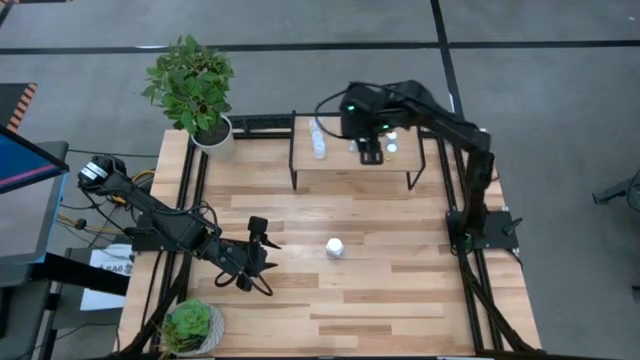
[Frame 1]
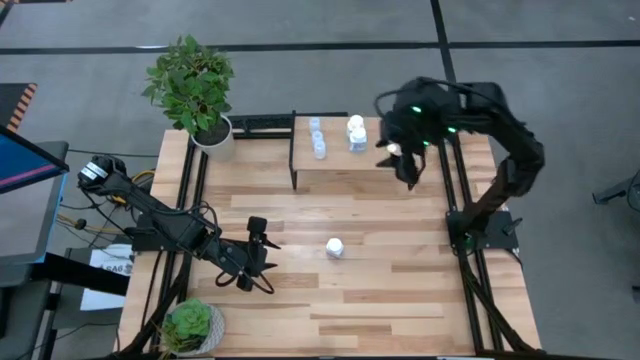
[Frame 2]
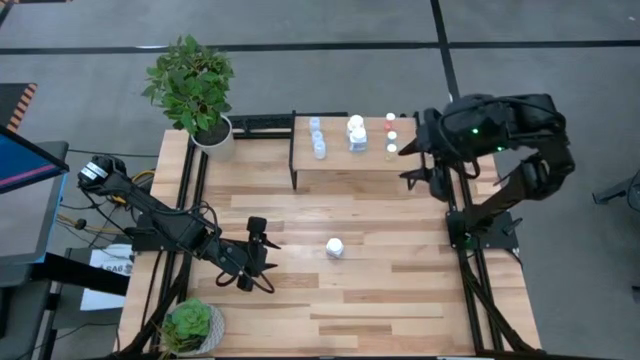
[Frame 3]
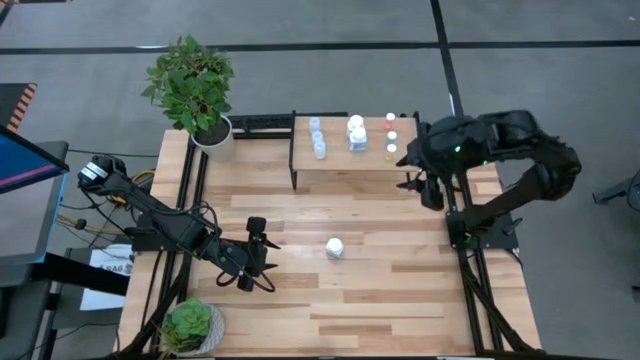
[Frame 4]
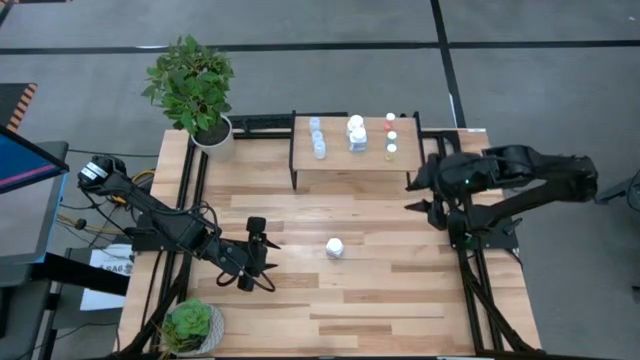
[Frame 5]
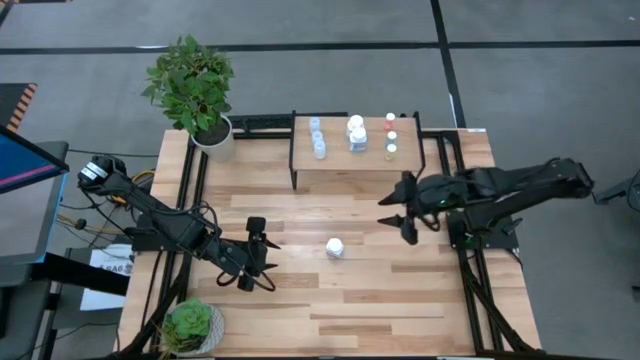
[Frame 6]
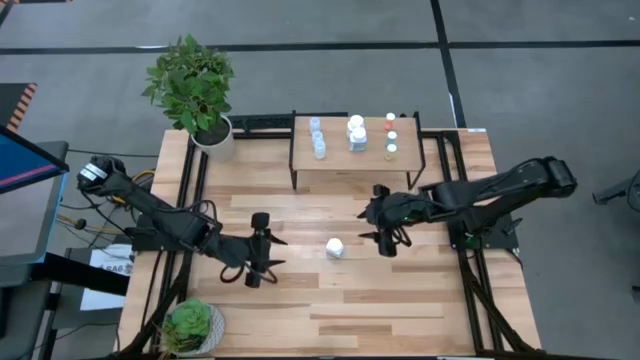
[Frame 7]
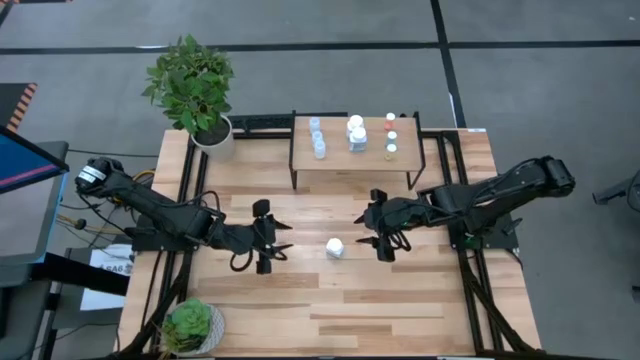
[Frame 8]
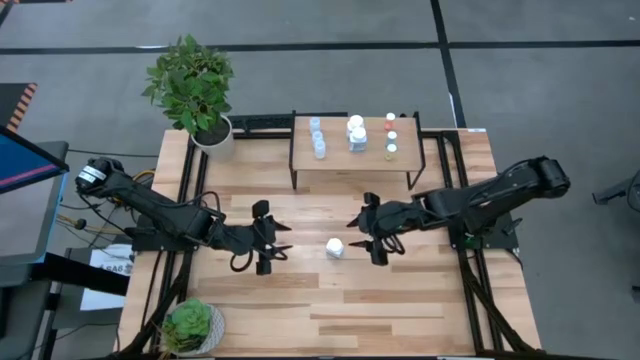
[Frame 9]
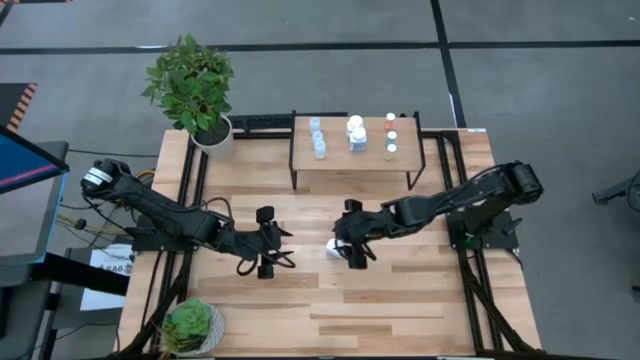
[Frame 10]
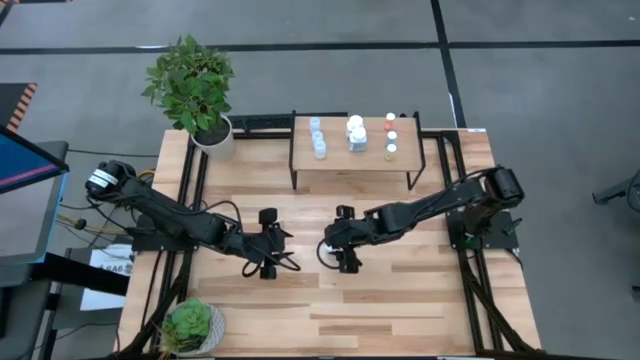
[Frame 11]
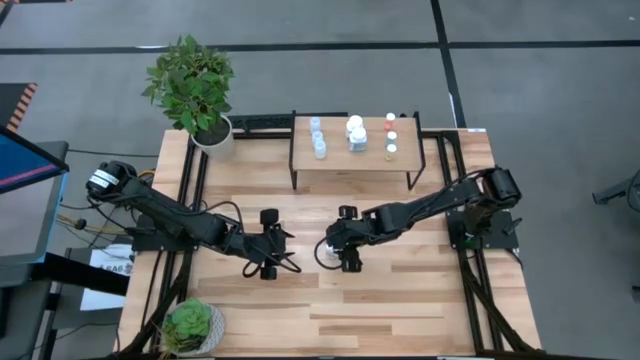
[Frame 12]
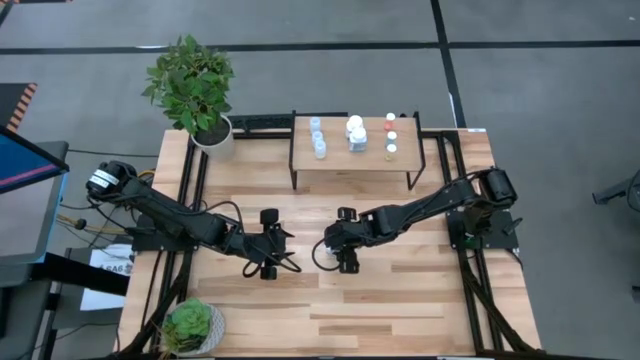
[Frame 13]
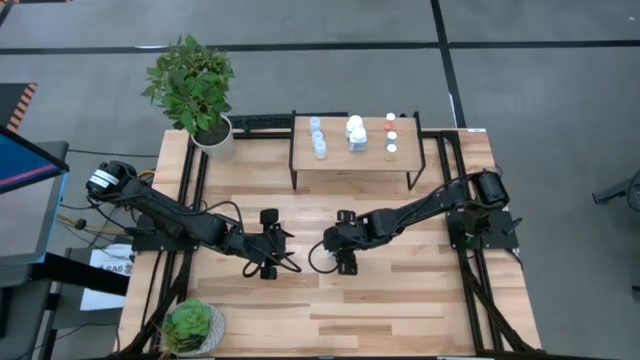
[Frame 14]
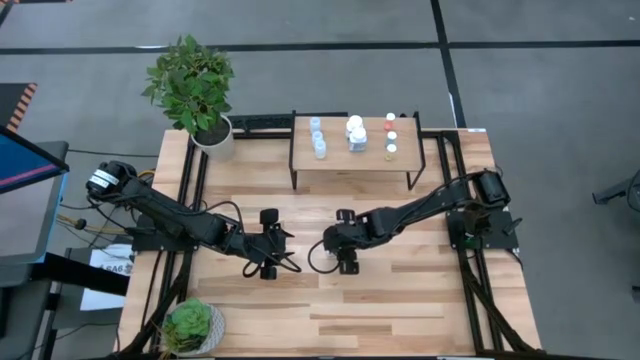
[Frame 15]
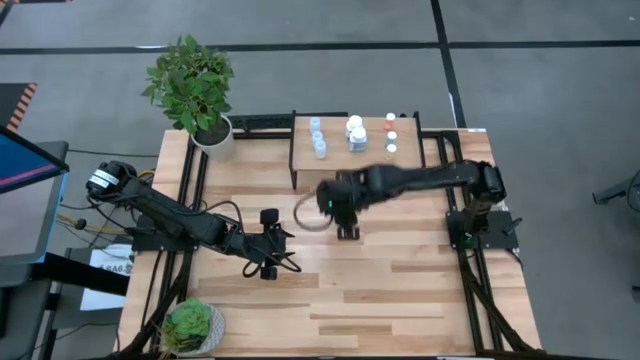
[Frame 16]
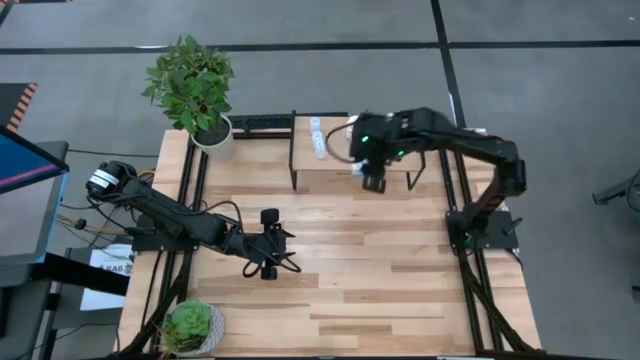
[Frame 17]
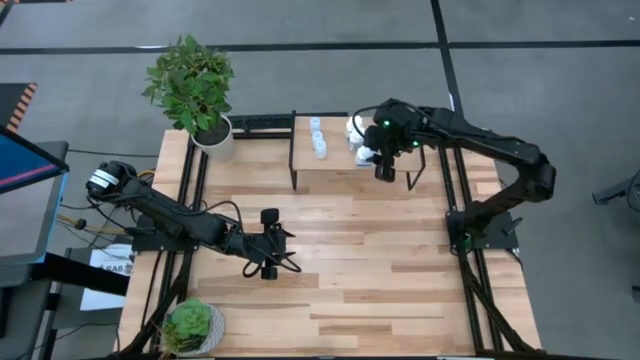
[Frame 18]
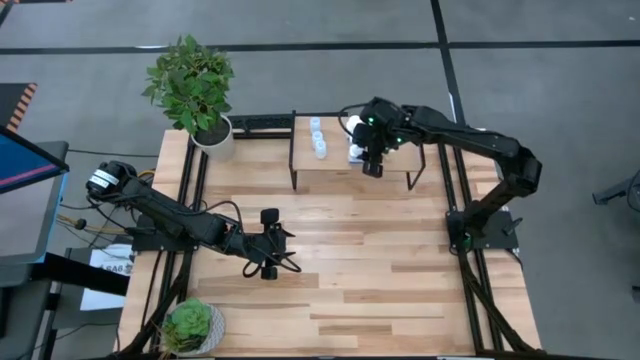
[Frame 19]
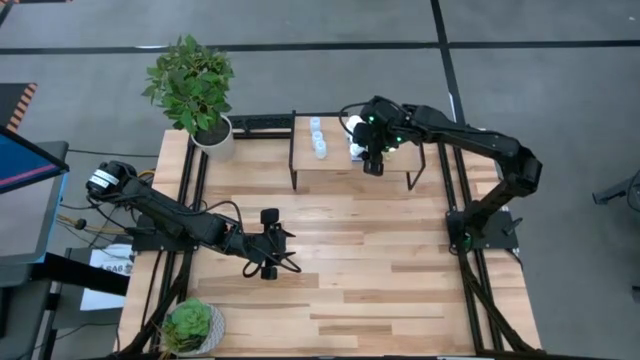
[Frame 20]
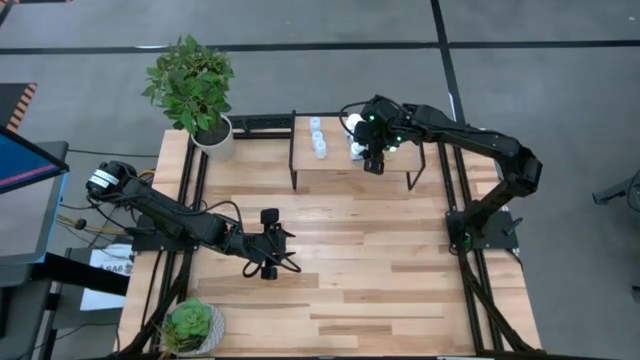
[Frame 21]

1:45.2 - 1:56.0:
Task: Pick and place medicine bottles onto shelf by color
Put the white pill bottle on the shelf aligned with the other white pill bottles

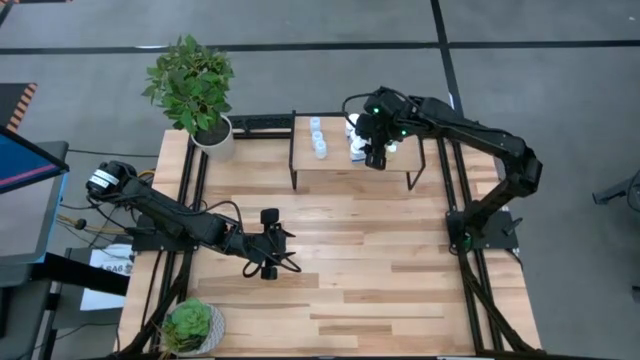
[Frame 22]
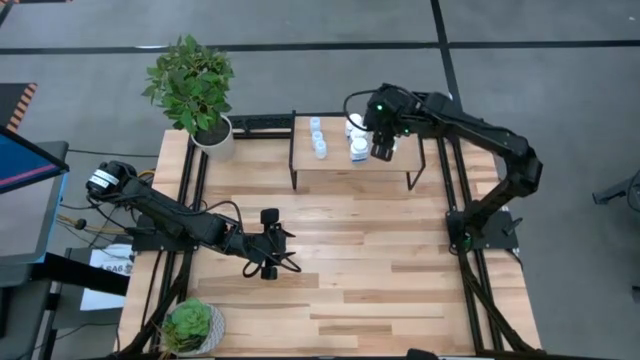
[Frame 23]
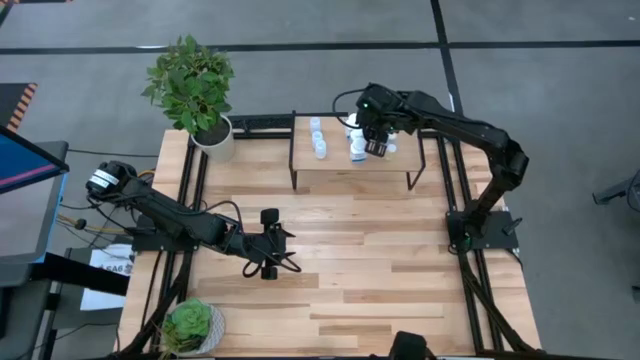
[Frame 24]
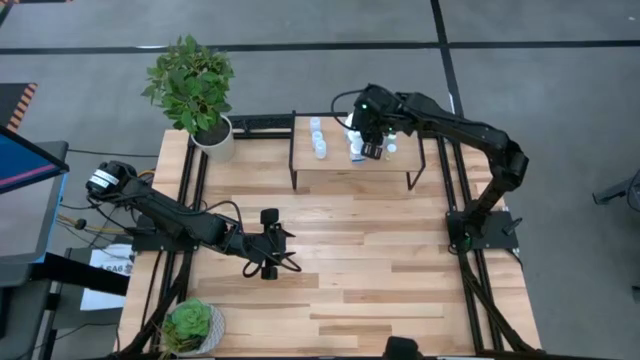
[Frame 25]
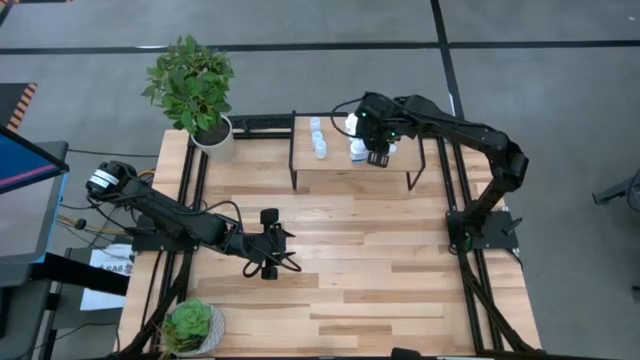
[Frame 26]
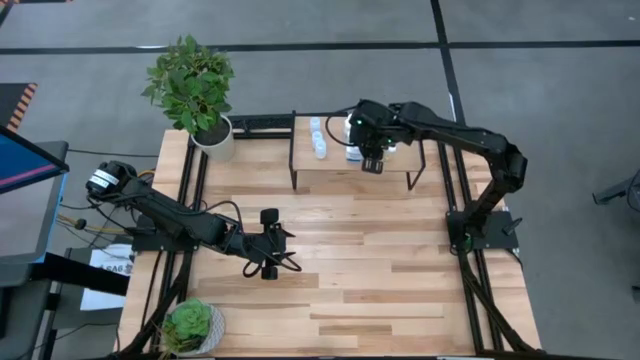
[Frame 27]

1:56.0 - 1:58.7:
Adjust the white pill bottles on the shelf

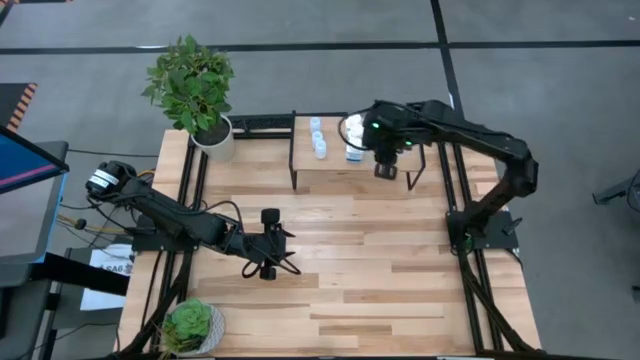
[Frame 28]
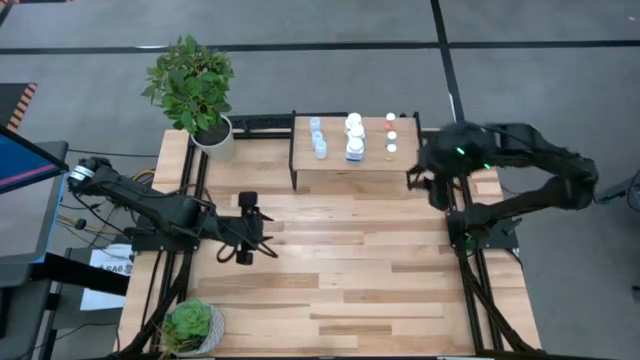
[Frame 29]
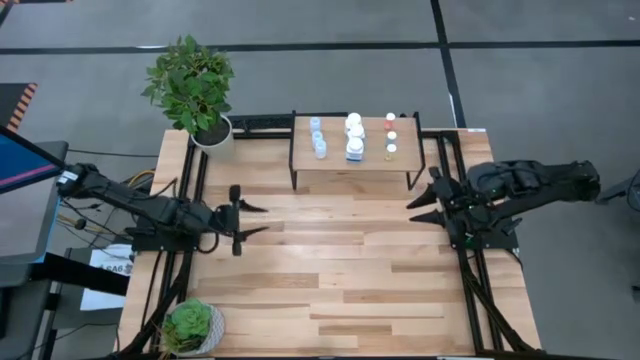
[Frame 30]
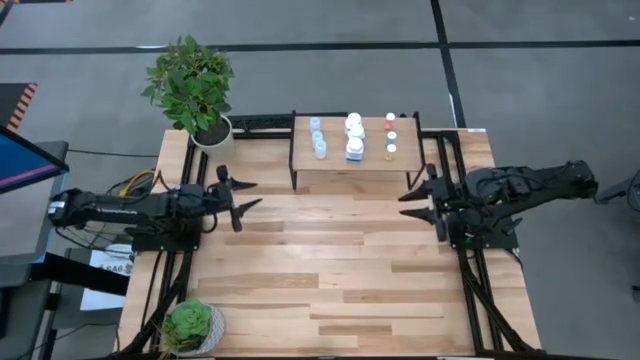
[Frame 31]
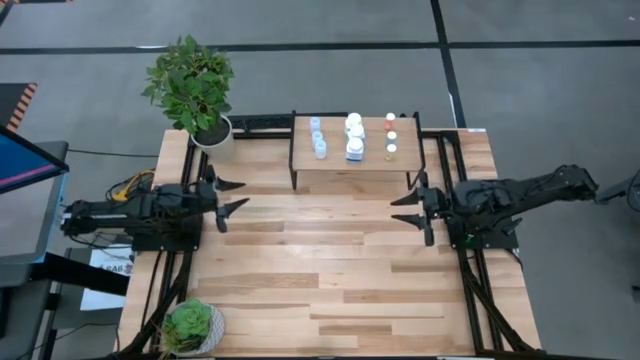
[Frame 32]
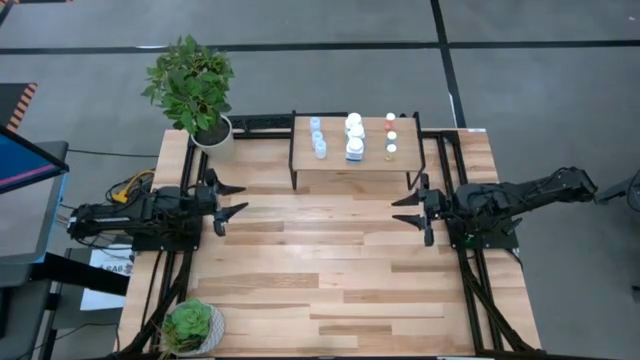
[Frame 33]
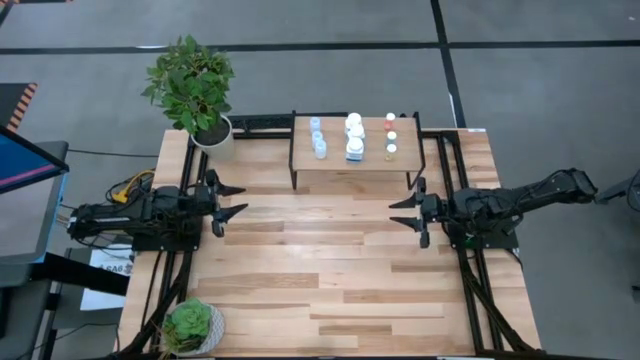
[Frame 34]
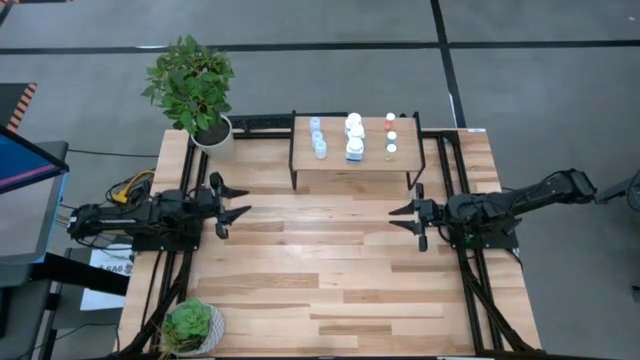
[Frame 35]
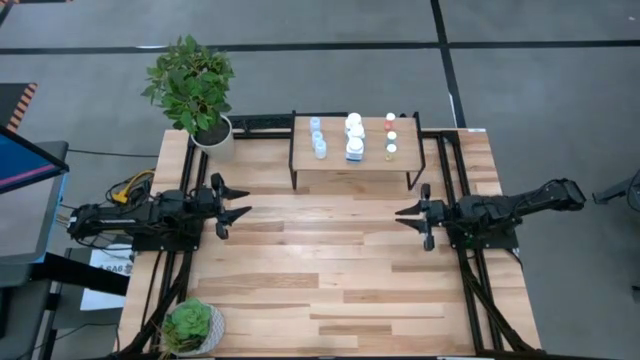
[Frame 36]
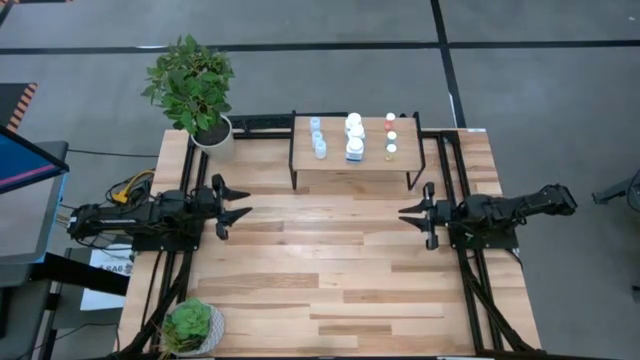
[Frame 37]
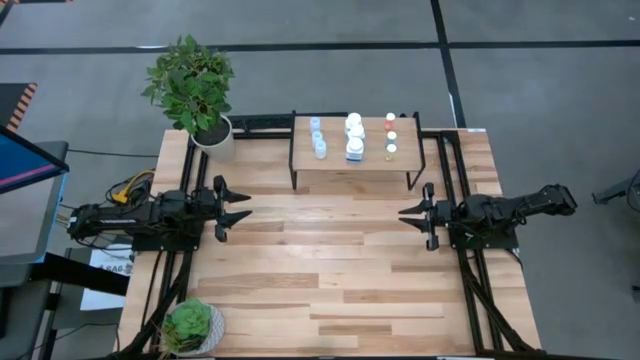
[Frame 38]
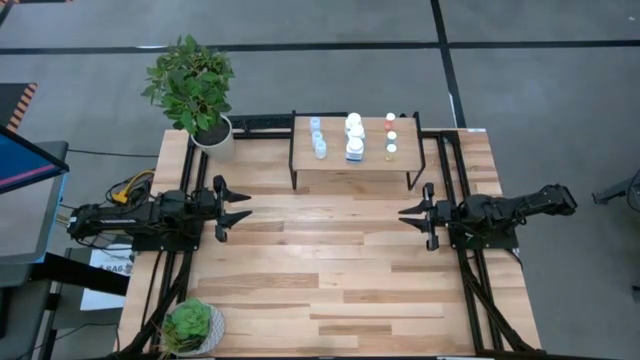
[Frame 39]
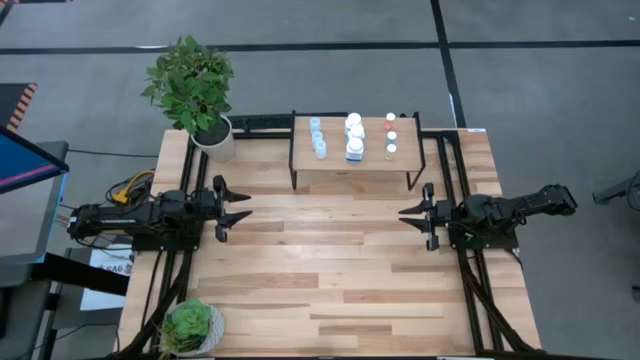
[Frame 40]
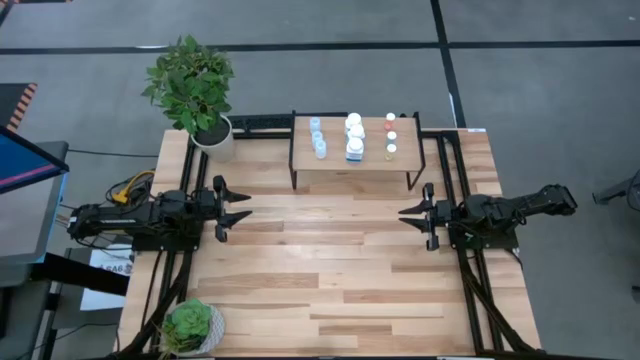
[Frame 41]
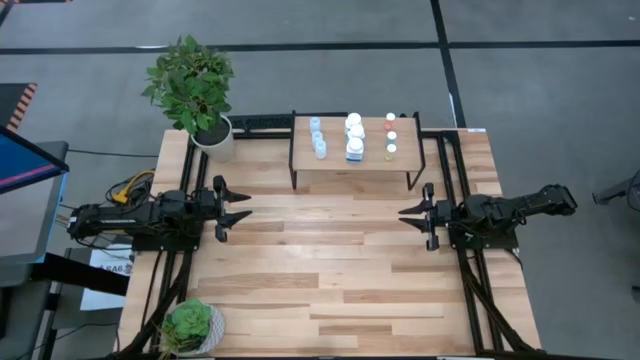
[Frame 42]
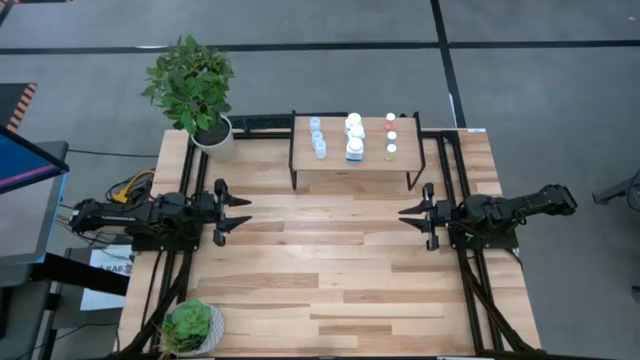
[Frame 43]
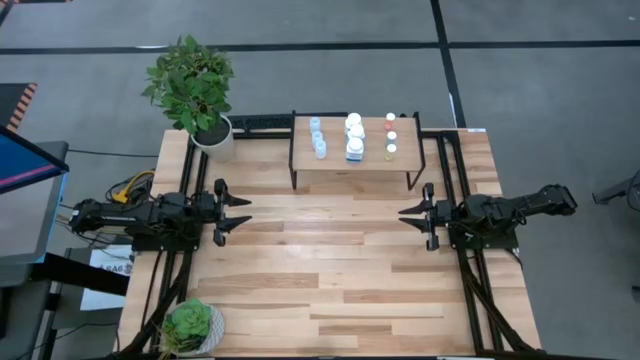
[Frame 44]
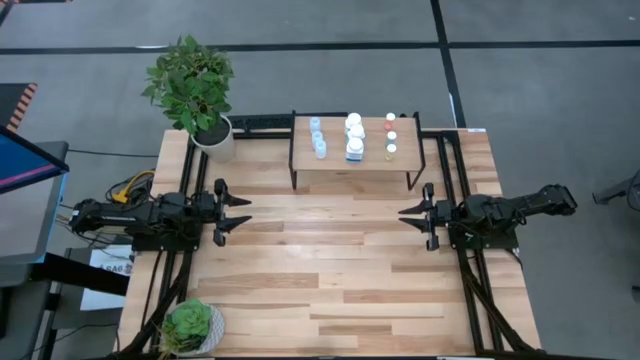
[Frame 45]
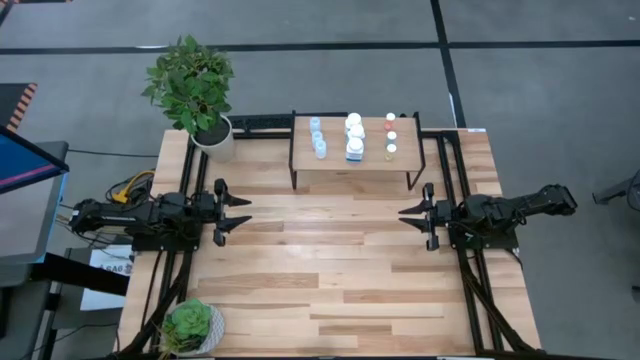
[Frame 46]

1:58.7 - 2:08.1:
Return to Home Position
